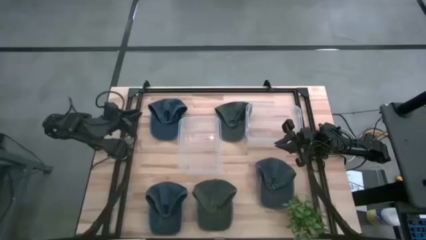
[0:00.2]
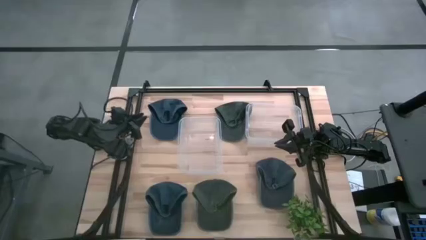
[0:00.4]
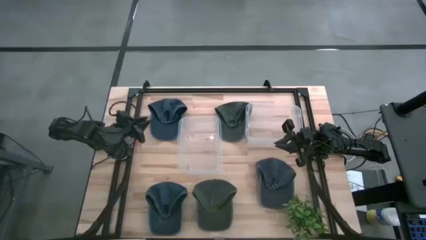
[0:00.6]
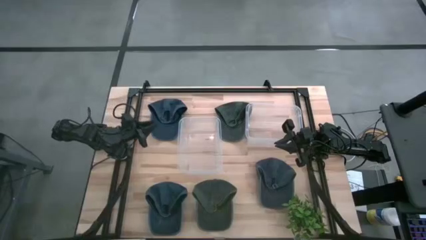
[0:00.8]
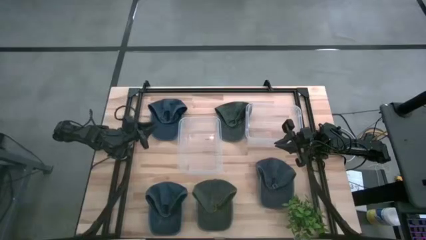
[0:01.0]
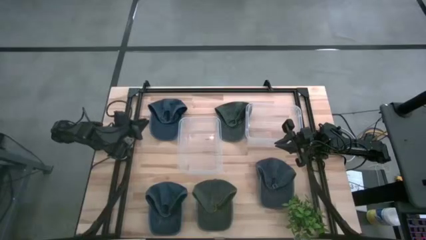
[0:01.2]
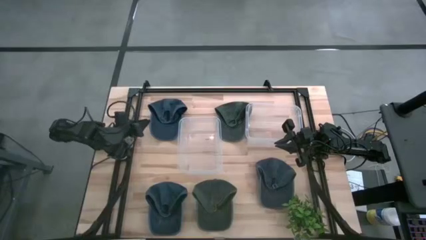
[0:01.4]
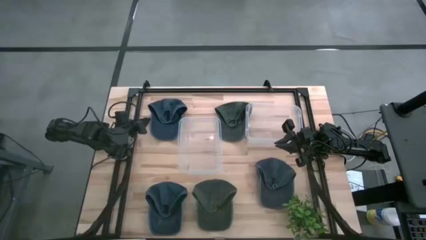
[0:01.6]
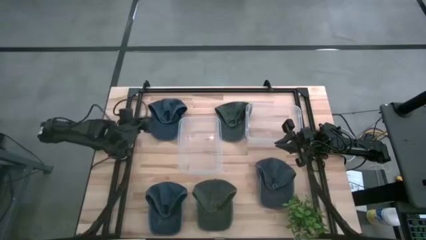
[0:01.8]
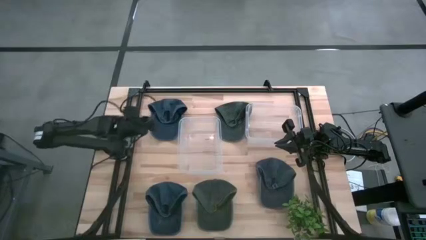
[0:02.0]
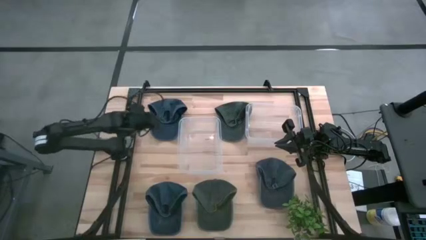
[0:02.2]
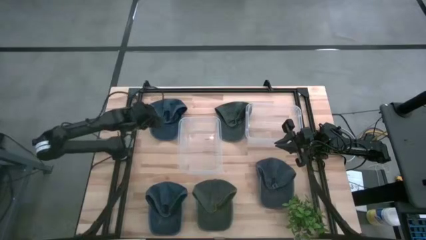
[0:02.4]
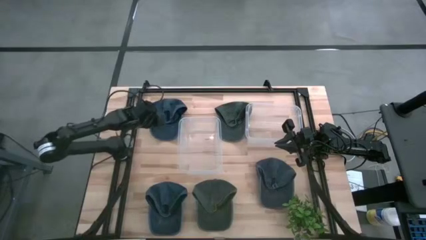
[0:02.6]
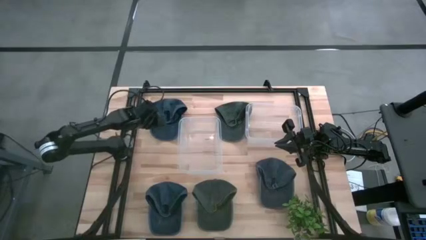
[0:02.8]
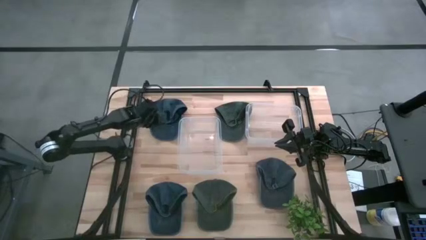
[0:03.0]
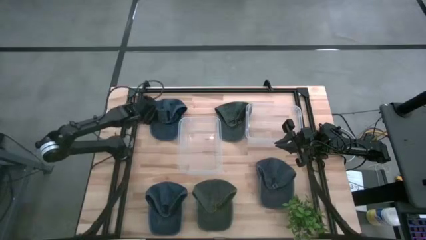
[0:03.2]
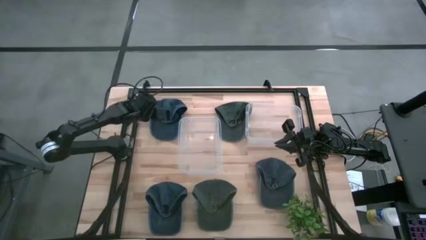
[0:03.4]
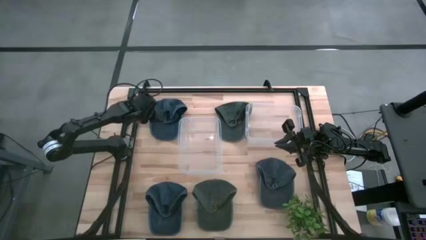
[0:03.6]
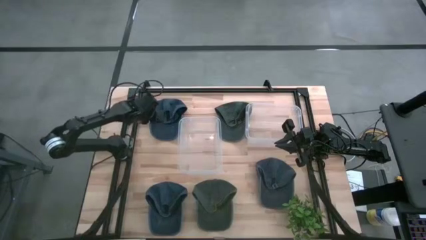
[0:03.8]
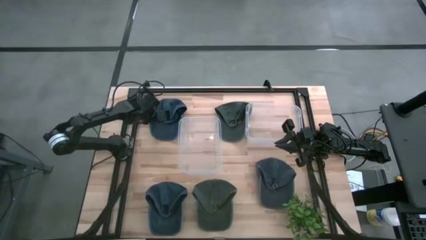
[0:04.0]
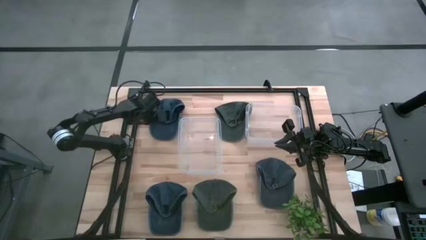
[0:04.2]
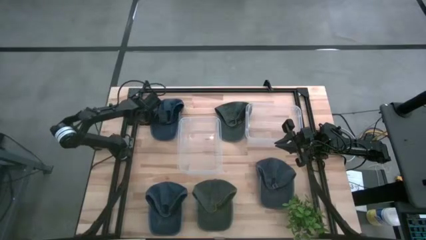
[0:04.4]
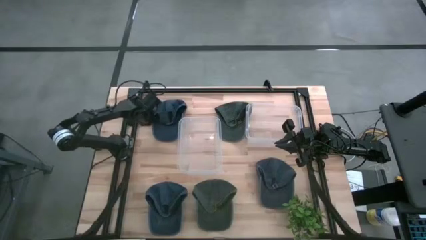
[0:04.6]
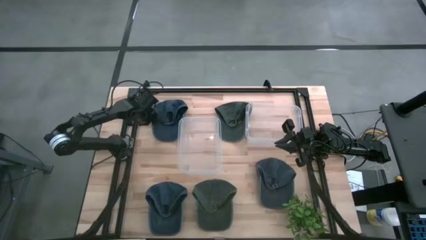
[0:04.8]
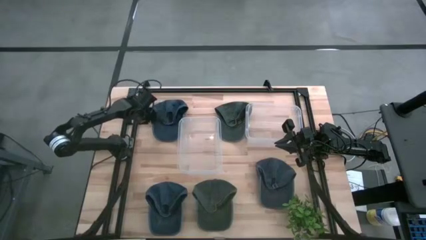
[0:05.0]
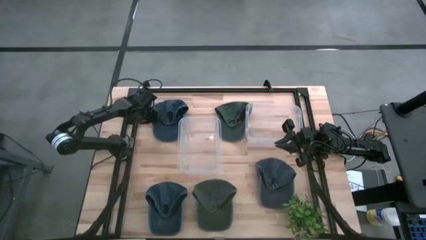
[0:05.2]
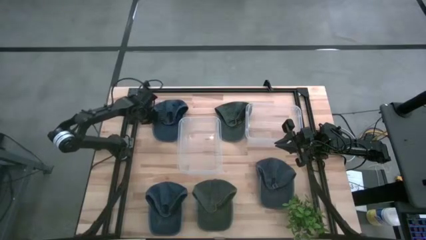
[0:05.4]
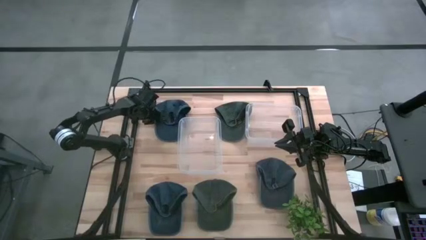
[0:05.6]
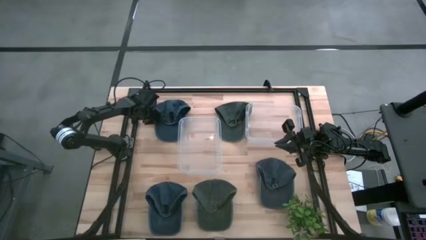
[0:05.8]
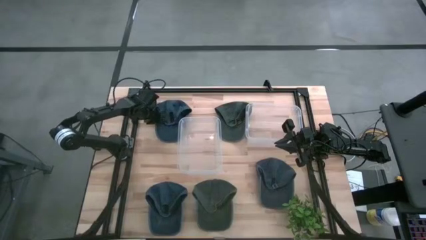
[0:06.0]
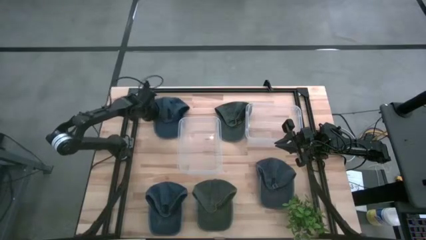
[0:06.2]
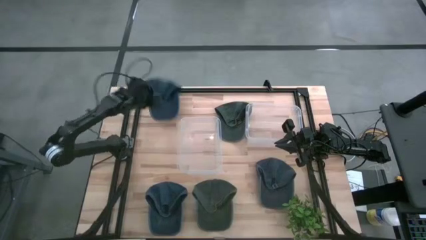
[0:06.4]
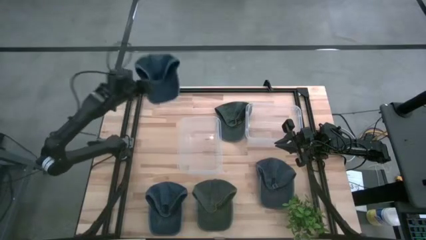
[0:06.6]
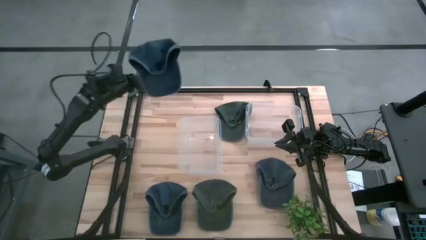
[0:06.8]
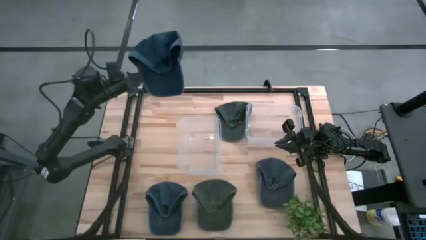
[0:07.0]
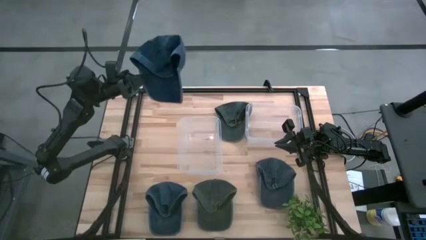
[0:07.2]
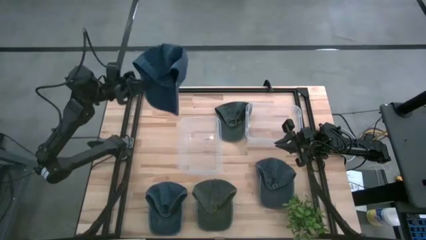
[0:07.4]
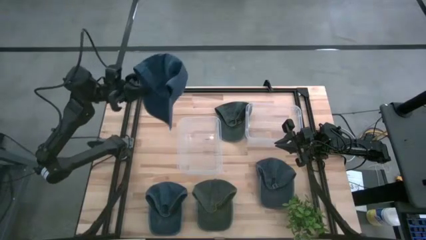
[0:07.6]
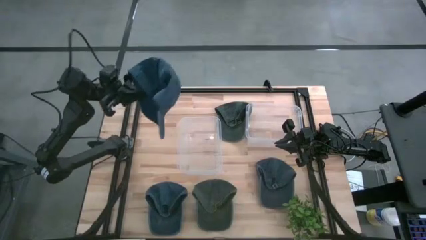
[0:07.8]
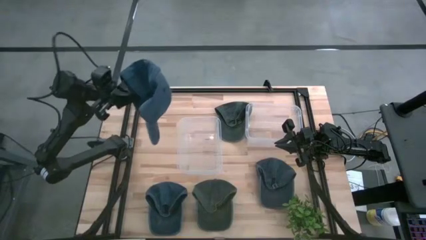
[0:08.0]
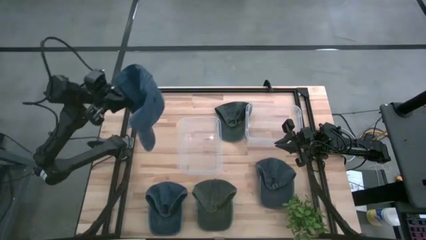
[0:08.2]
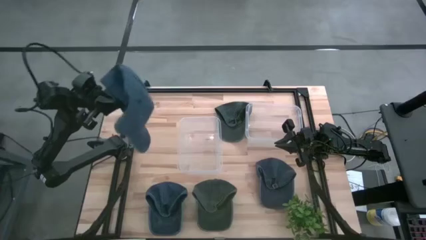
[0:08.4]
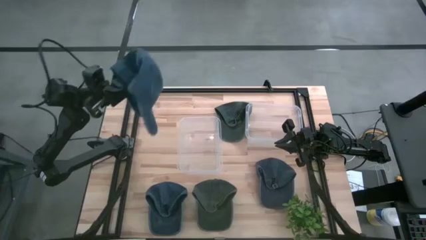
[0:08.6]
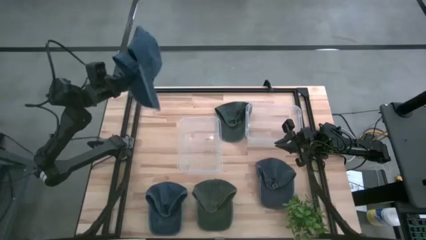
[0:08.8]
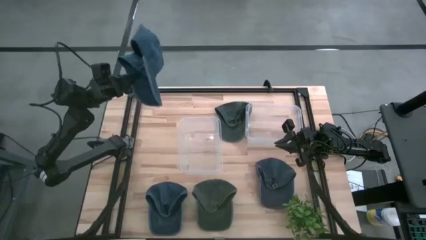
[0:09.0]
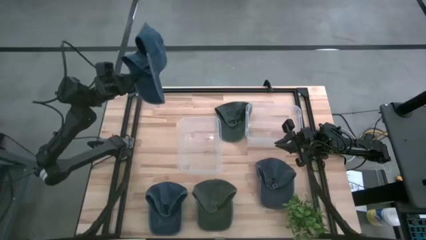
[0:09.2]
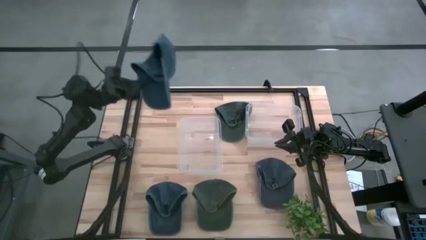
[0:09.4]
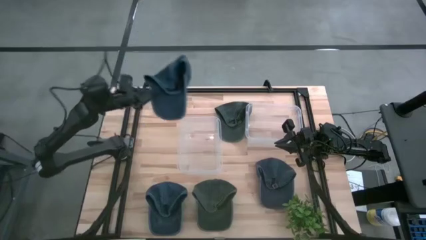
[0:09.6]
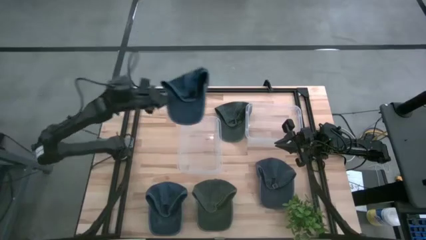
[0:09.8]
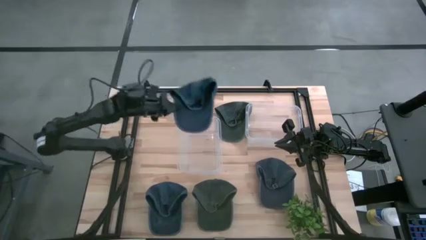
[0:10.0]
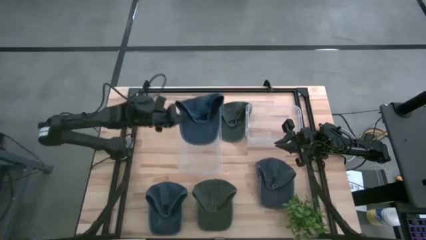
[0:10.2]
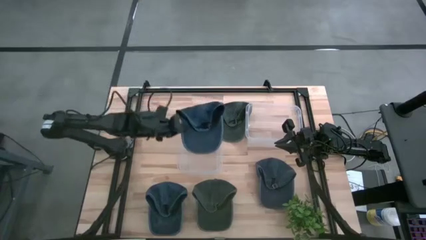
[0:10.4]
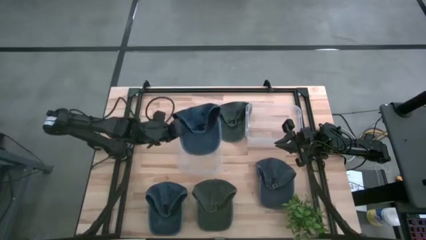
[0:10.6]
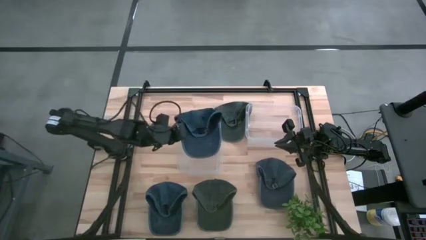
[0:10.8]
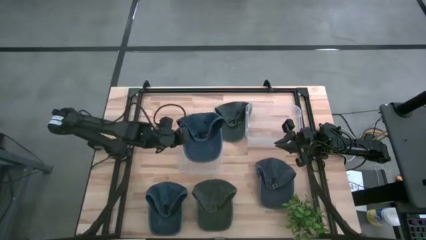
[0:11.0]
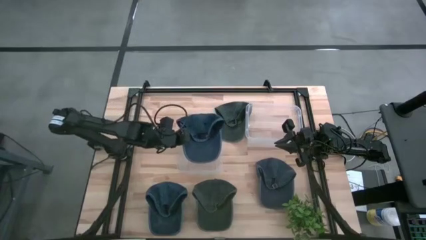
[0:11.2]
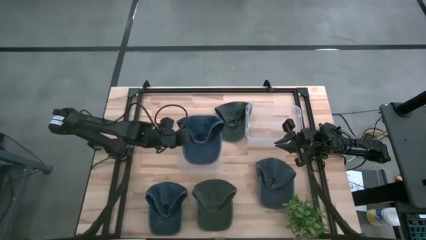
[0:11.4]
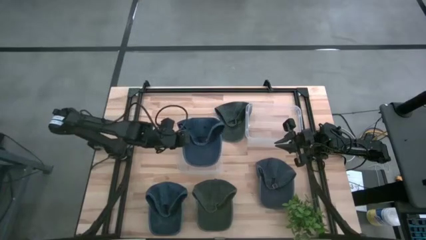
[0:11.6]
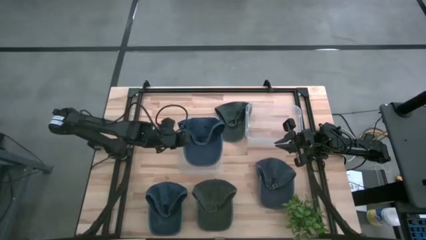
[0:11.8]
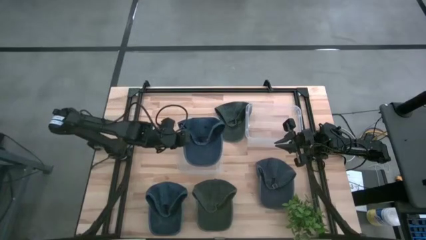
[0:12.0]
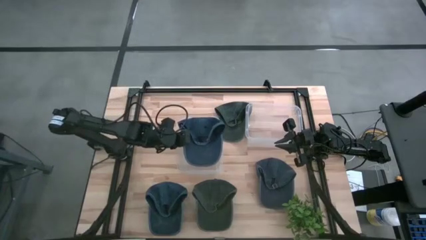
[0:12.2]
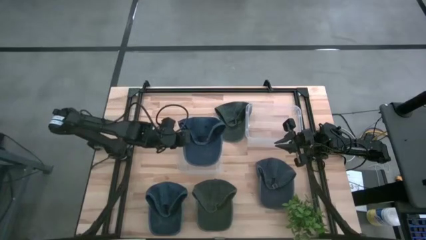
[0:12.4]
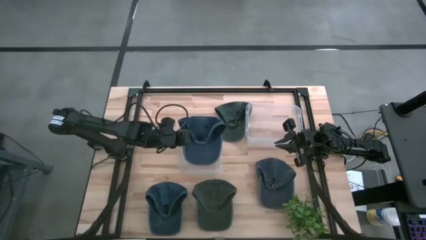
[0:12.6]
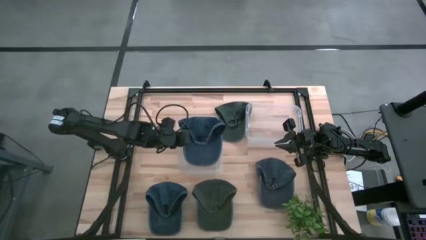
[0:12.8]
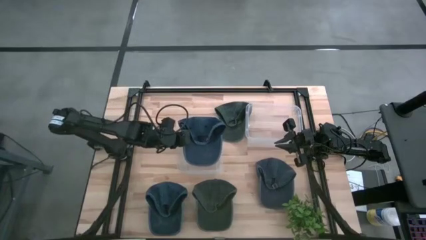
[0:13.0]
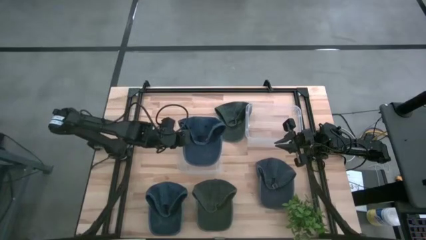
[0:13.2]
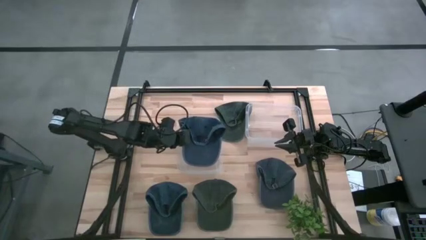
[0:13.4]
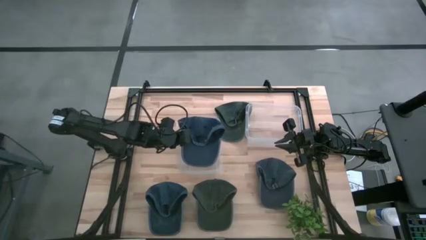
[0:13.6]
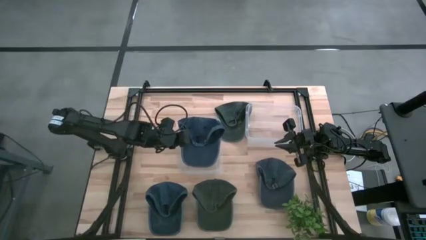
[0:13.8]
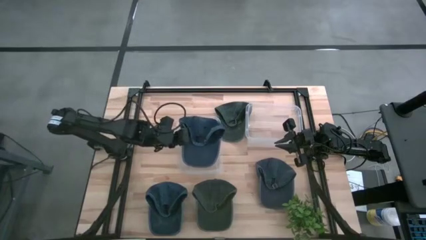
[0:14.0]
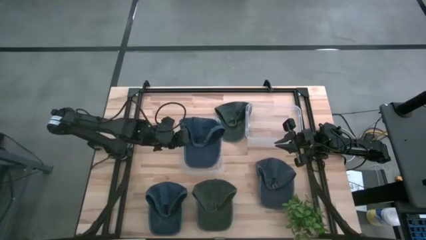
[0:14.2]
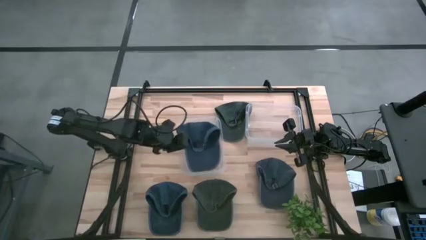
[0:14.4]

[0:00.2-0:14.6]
Task: Pick and place caps into container
Put the top blue cap into the left transparent container
